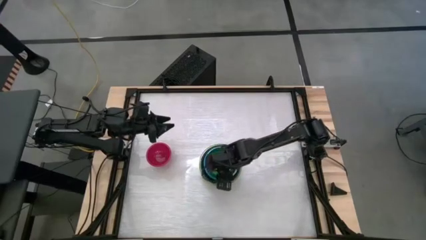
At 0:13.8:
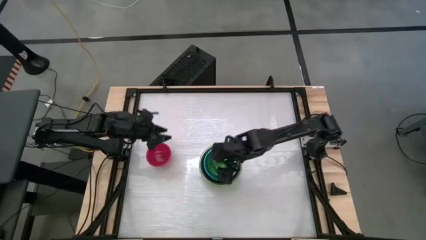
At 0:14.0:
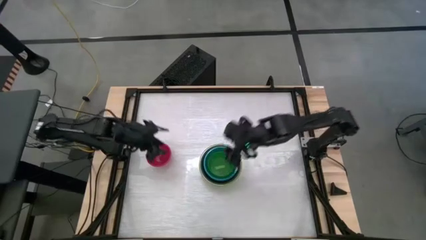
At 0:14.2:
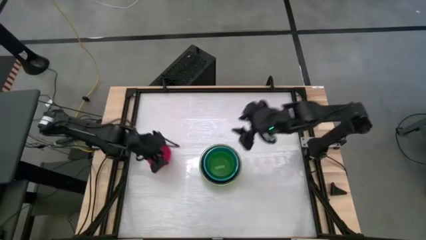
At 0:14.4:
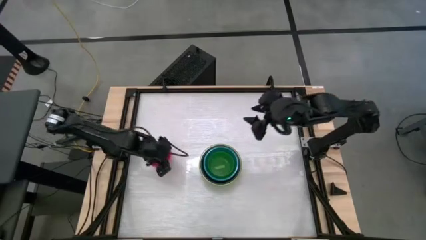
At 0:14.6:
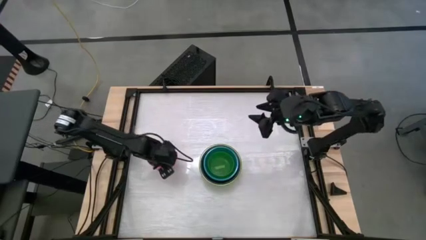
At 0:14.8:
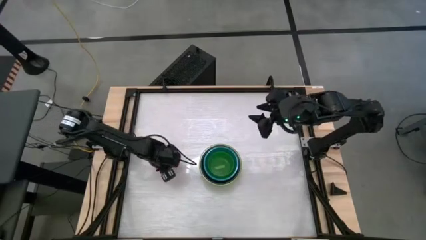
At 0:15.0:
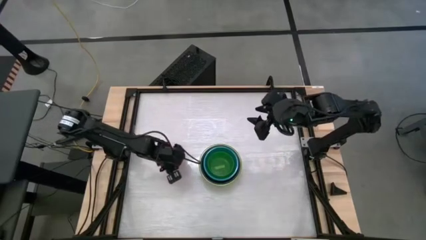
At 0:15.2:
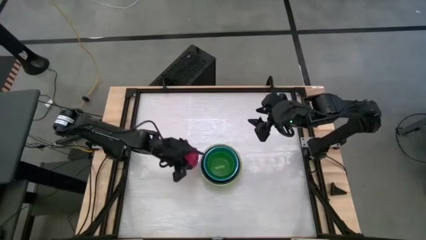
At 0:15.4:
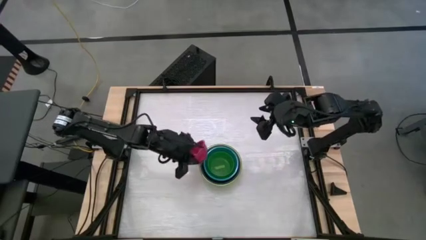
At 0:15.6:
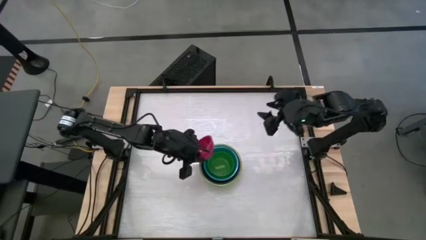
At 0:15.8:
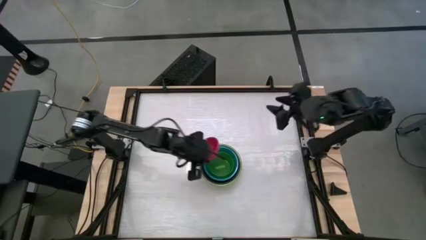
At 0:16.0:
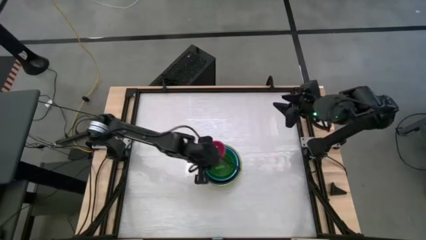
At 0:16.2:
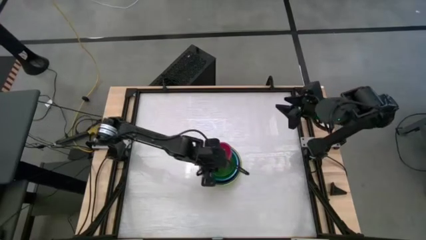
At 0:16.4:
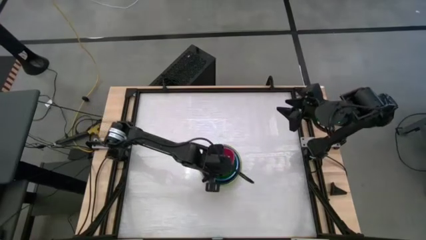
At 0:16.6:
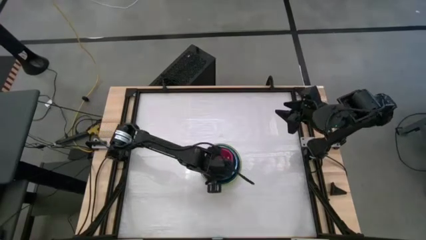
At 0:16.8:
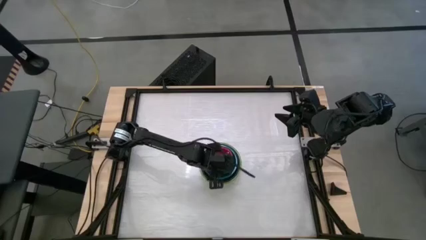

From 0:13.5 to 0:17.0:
Stack the red bowl on top of the transparent green bowl

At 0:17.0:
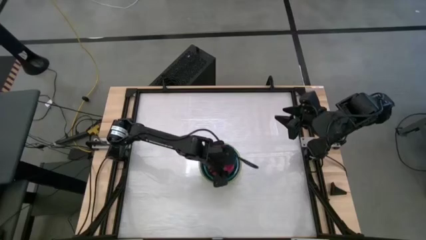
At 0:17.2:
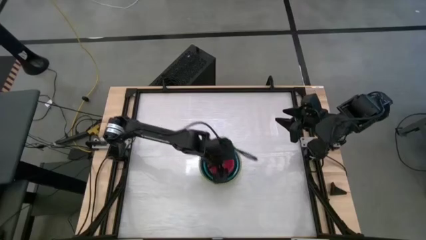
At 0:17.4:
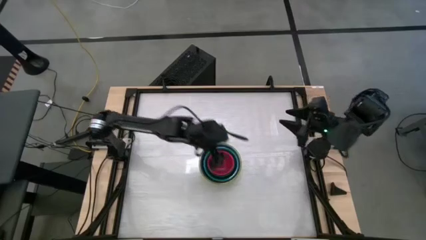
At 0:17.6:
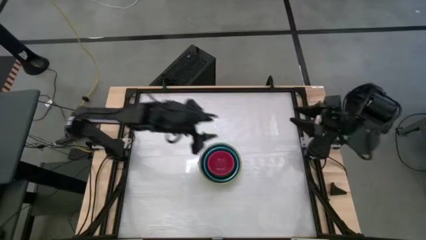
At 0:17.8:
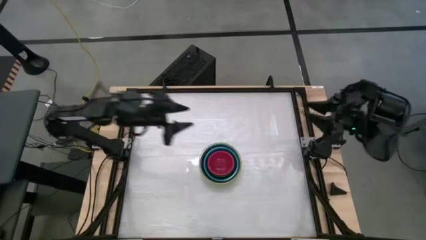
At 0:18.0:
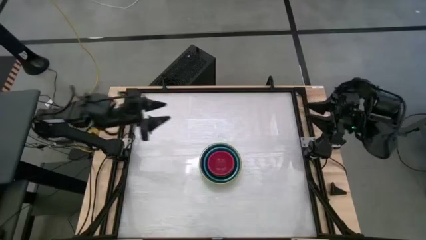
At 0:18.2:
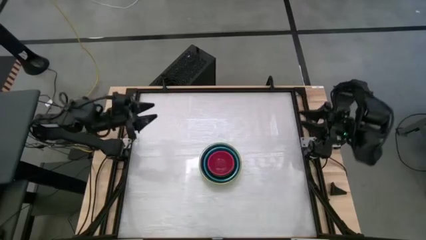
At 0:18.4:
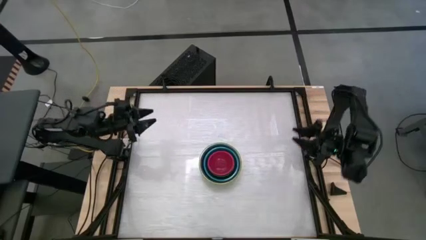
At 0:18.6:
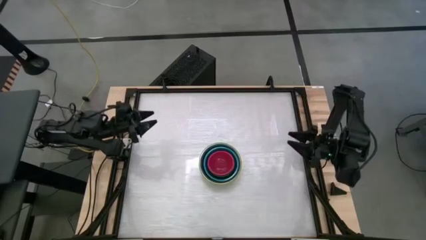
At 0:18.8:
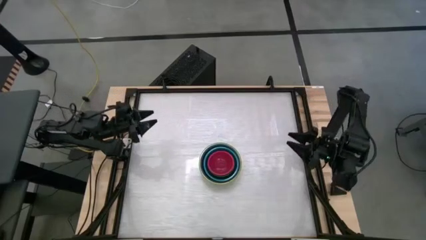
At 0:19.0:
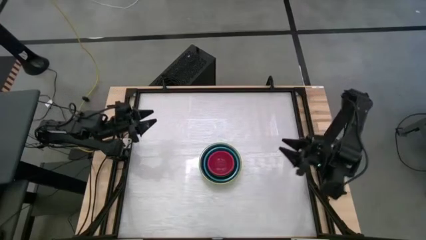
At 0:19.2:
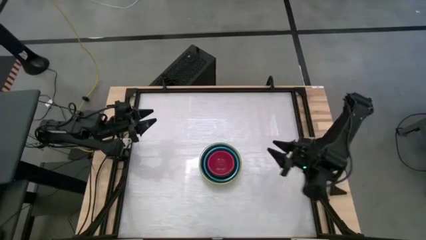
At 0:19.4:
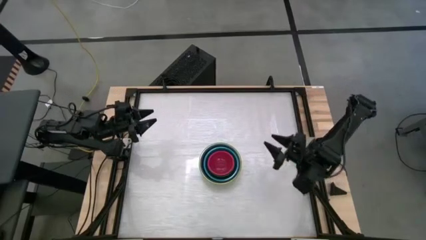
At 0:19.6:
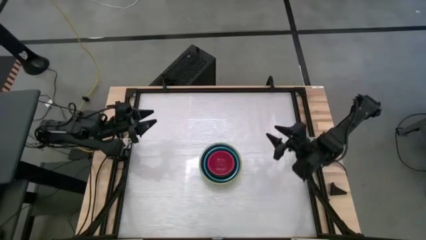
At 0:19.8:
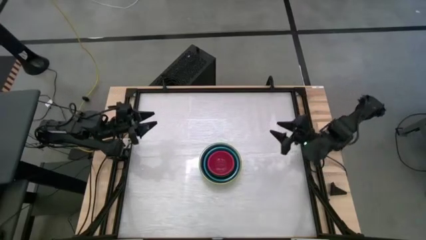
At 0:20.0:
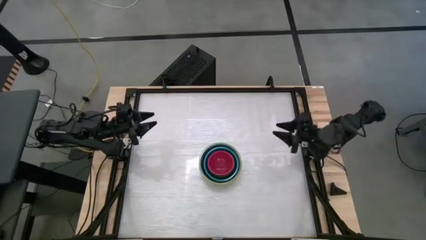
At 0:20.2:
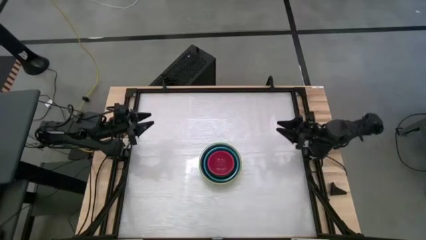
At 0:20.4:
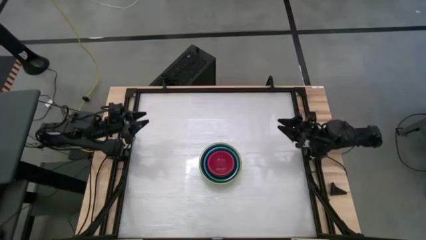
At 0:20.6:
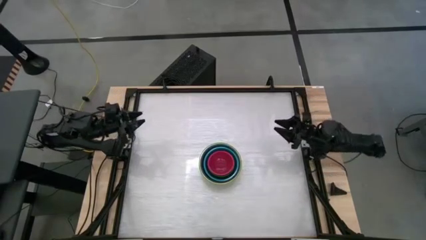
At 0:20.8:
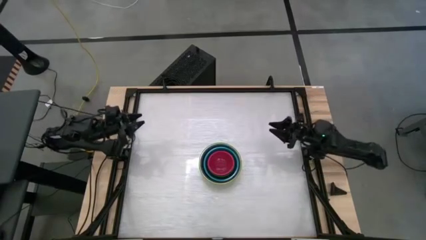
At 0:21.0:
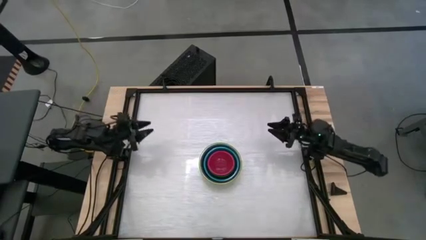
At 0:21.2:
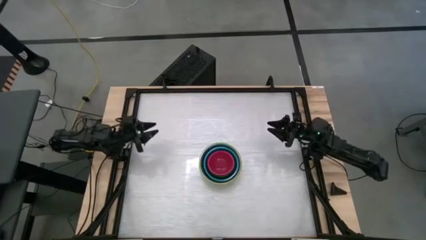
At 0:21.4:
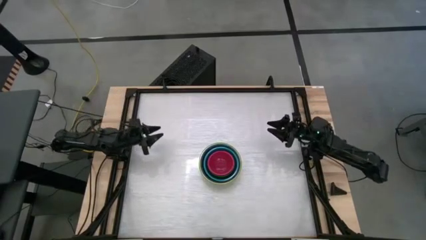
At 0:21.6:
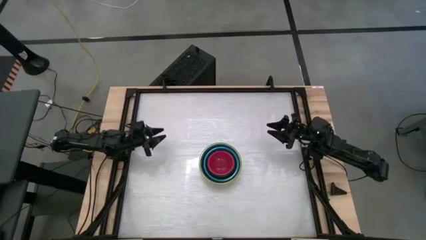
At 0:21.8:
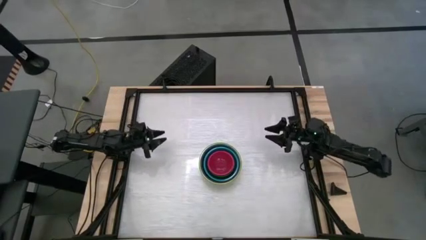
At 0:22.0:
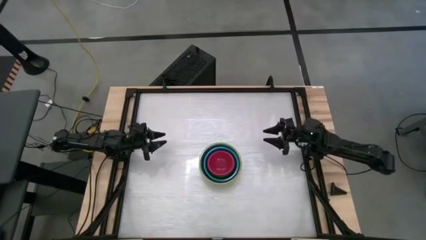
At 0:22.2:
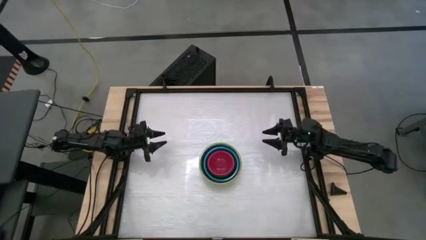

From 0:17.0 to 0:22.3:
Return to home position

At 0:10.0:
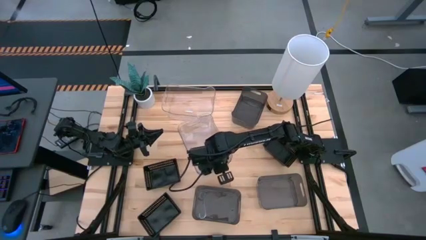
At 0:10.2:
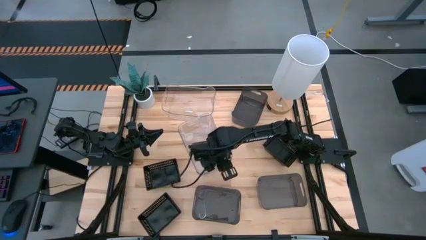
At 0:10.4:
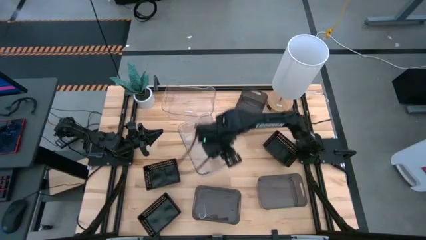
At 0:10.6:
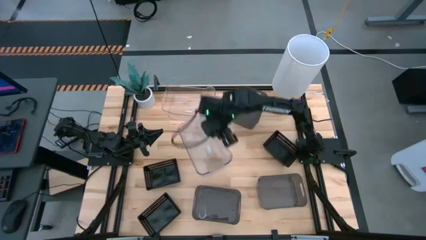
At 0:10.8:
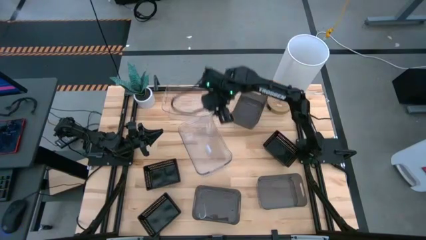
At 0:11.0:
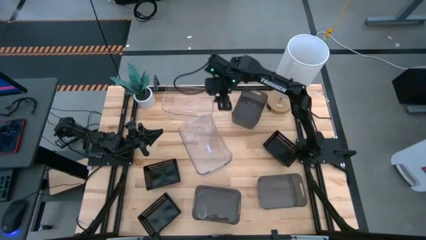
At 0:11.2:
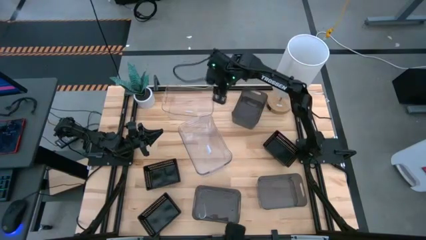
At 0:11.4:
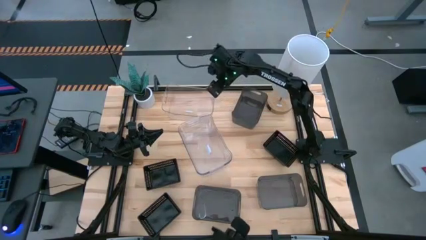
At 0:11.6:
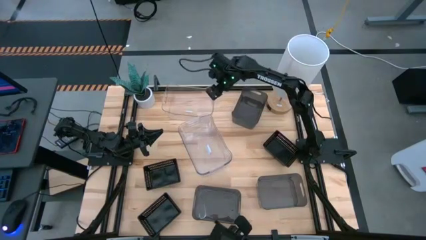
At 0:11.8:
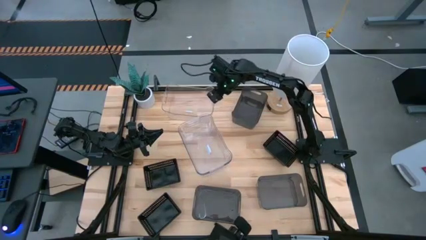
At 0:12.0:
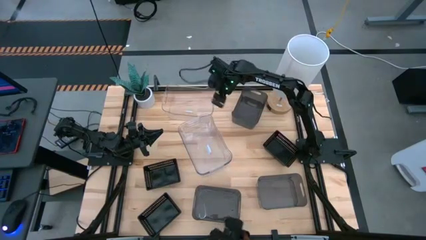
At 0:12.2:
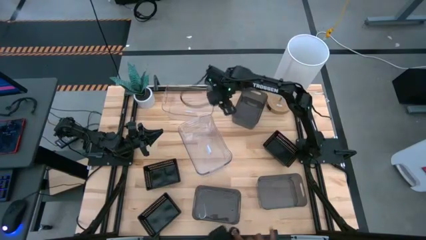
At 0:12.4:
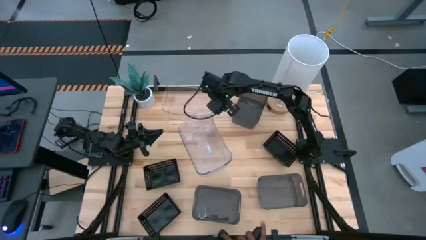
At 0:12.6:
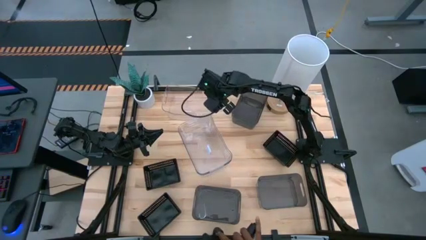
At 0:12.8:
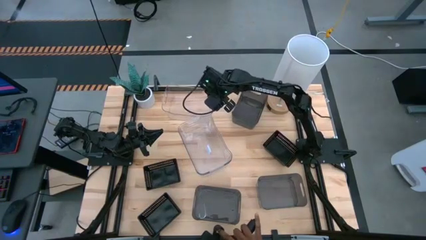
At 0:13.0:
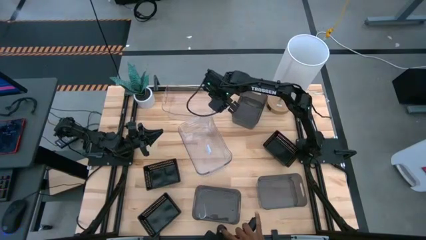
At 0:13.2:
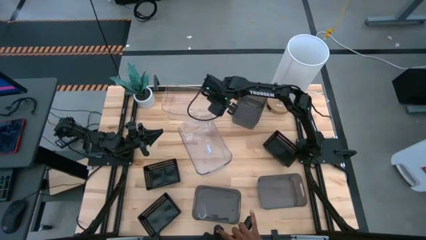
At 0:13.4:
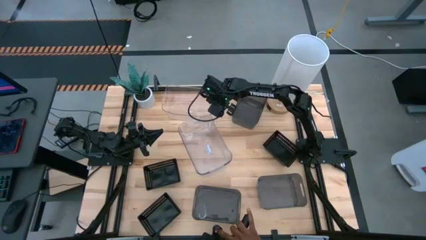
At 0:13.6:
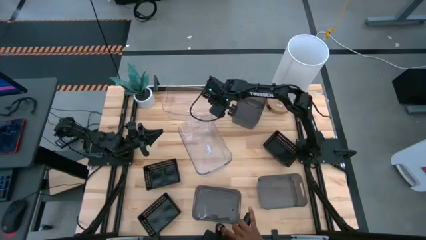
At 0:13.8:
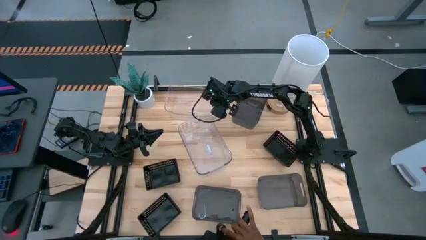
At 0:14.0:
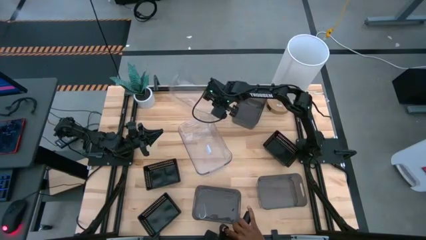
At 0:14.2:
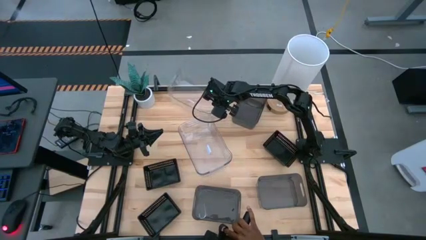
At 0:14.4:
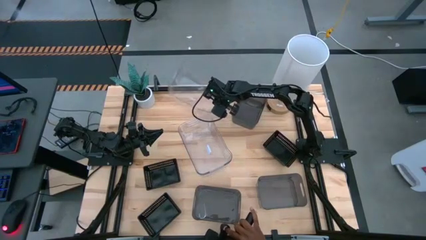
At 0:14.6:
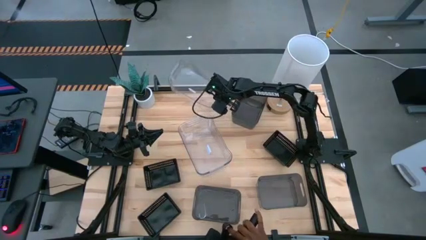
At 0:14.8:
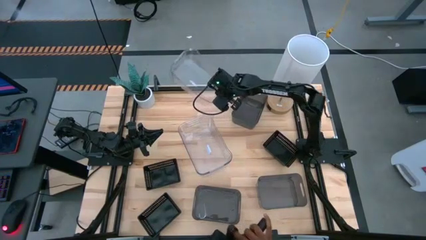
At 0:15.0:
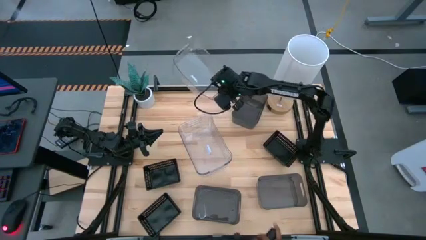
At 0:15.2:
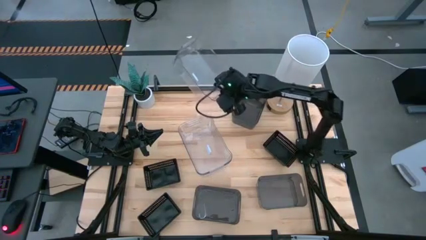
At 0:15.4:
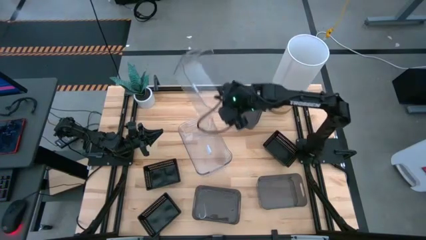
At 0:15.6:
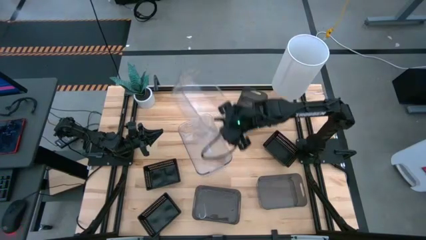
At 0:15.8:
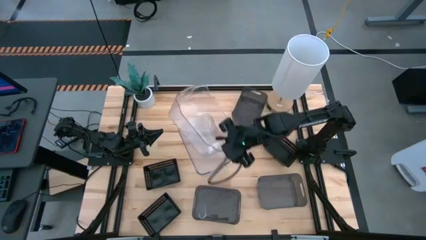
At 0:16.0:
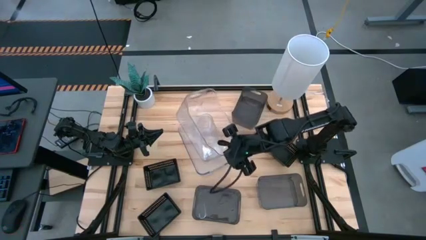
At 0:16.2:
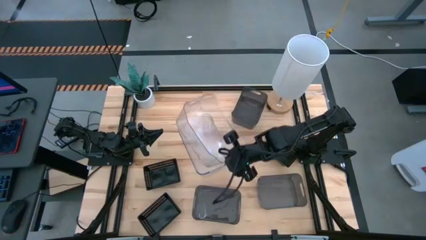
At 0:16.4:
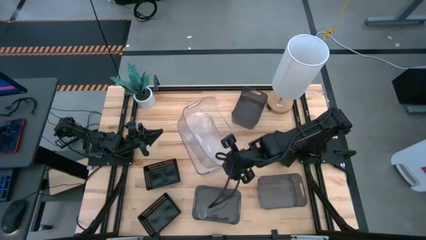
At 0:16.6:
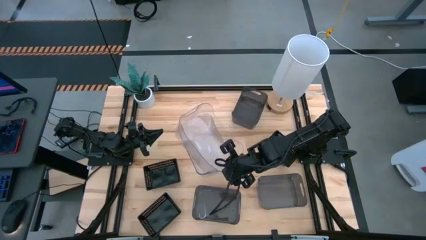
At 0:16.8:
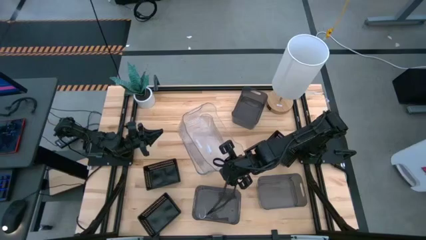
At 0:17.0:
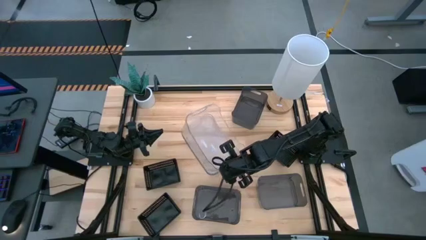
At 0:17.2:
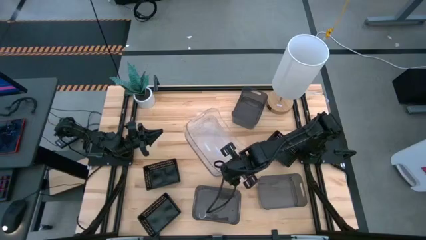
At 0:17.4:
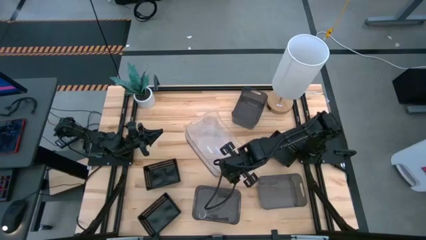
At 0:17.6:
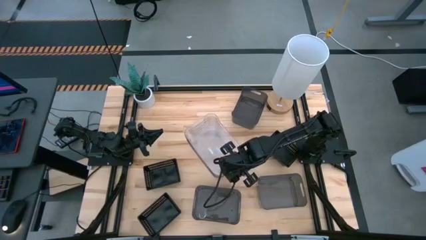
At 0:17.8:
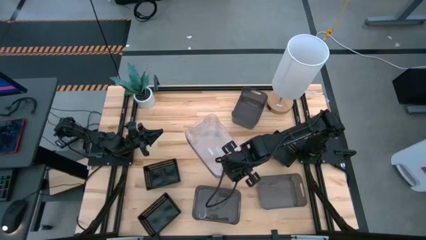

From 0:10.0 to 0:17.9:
Stack the top transparent bin on top of the bottom transparent bin
